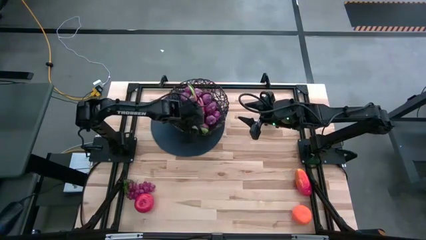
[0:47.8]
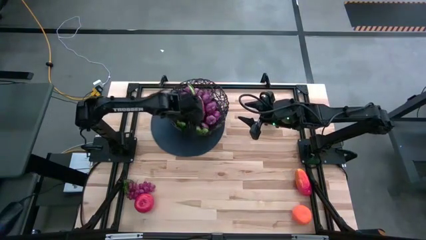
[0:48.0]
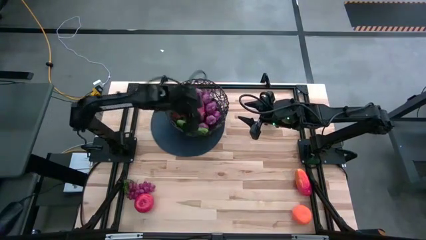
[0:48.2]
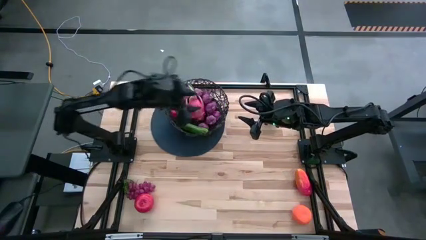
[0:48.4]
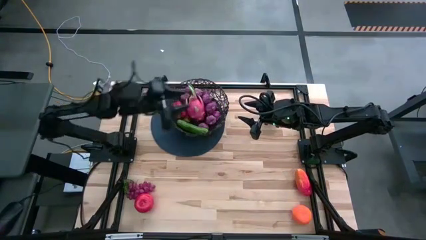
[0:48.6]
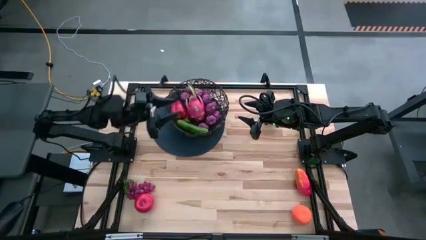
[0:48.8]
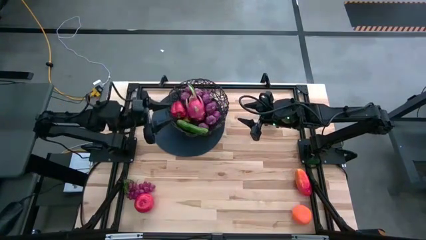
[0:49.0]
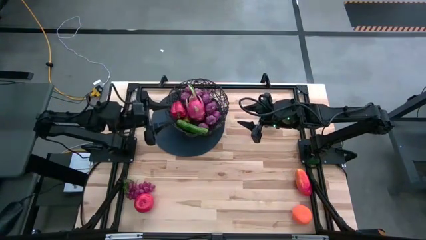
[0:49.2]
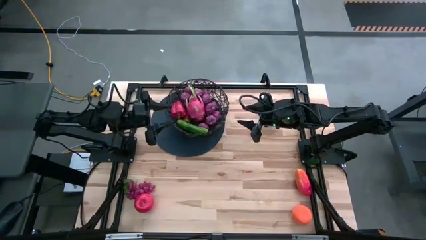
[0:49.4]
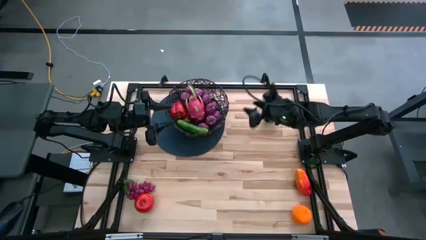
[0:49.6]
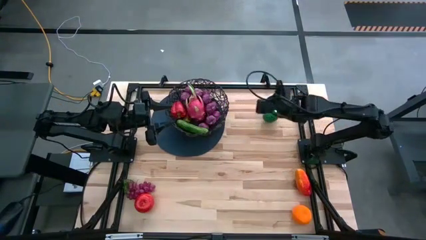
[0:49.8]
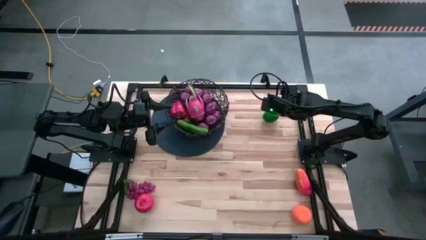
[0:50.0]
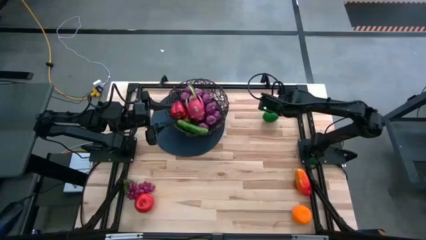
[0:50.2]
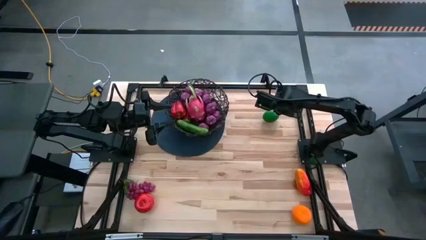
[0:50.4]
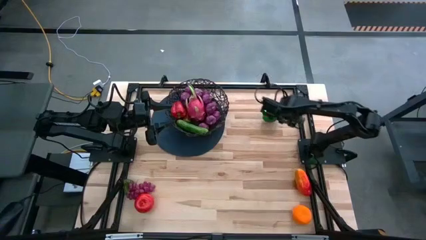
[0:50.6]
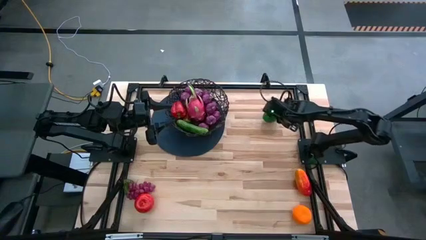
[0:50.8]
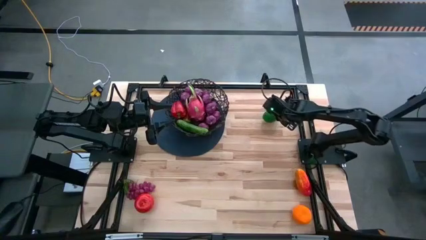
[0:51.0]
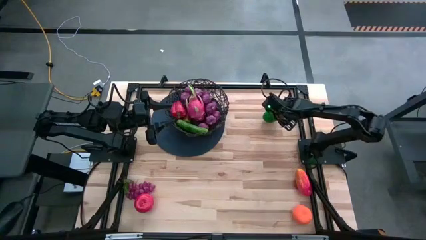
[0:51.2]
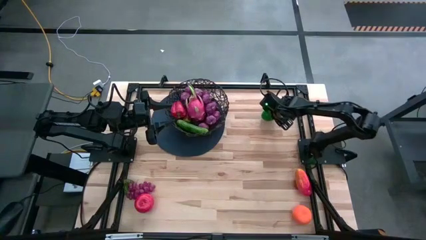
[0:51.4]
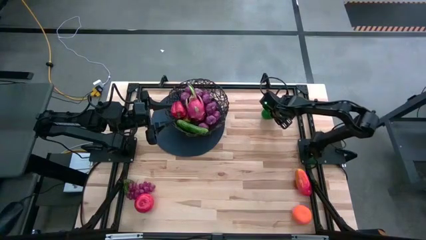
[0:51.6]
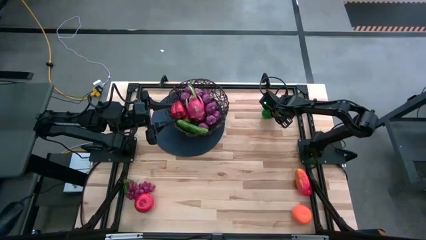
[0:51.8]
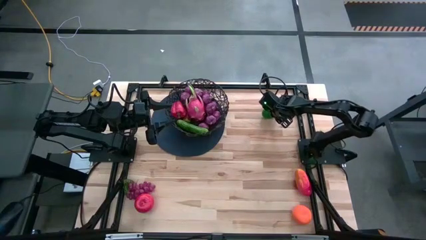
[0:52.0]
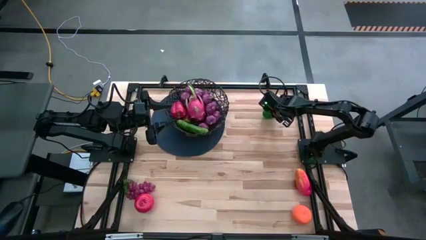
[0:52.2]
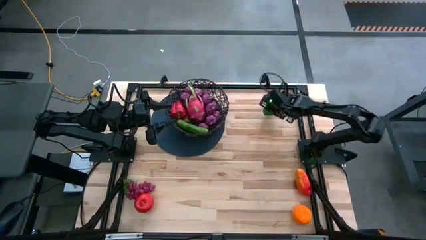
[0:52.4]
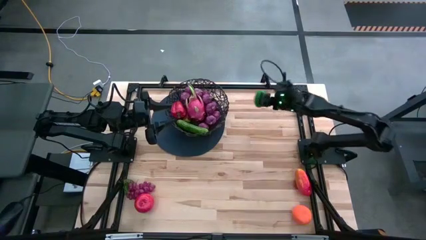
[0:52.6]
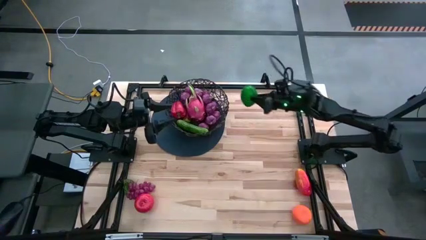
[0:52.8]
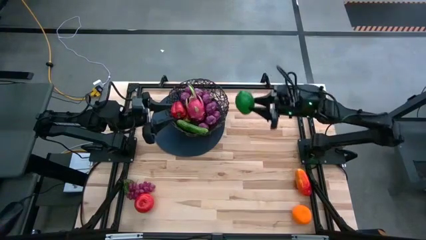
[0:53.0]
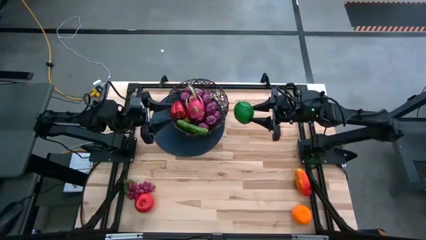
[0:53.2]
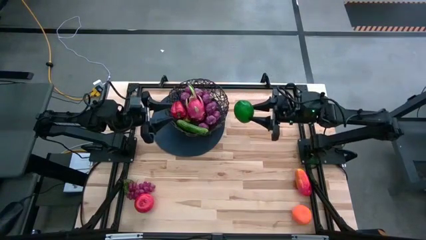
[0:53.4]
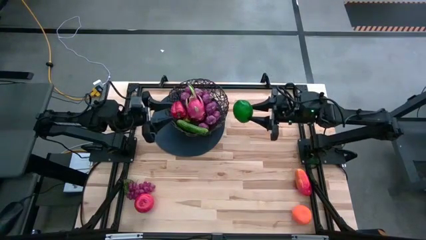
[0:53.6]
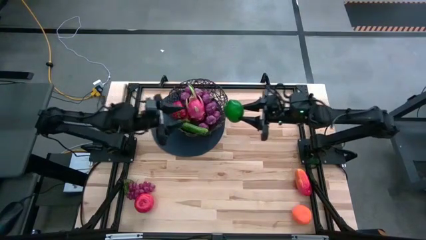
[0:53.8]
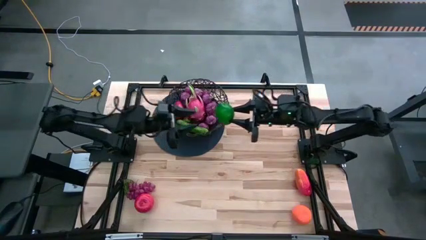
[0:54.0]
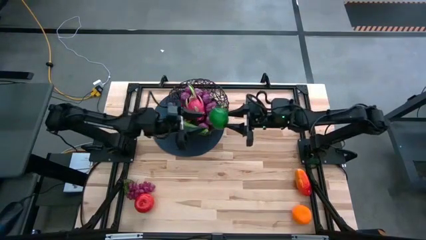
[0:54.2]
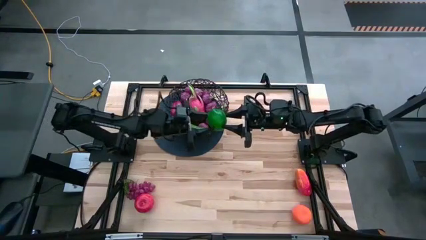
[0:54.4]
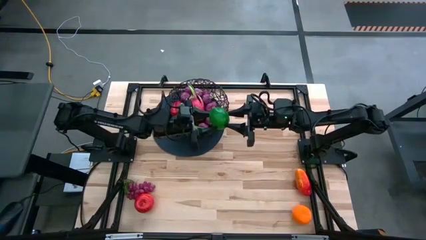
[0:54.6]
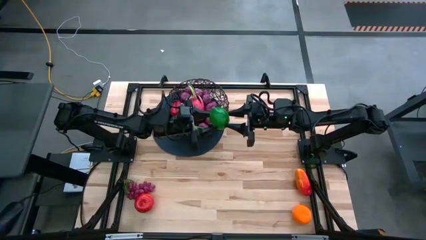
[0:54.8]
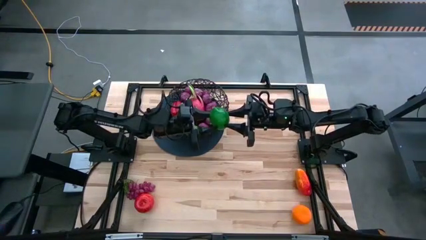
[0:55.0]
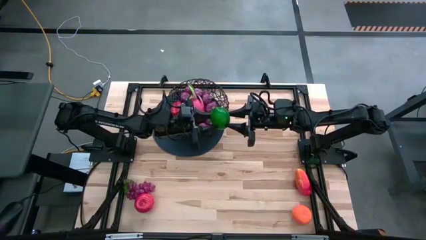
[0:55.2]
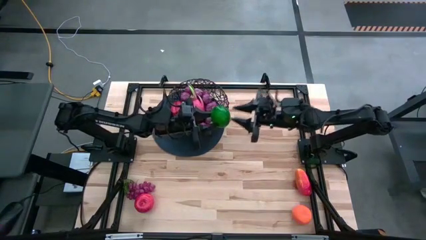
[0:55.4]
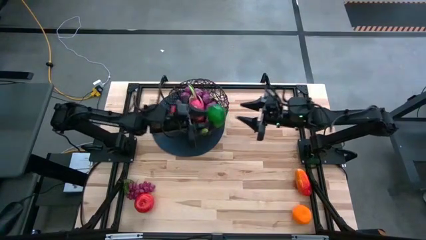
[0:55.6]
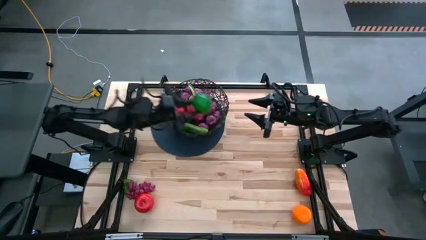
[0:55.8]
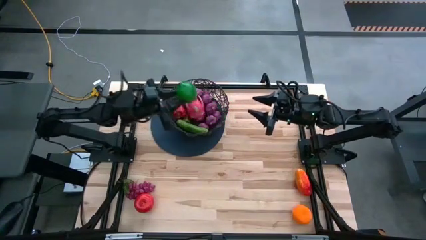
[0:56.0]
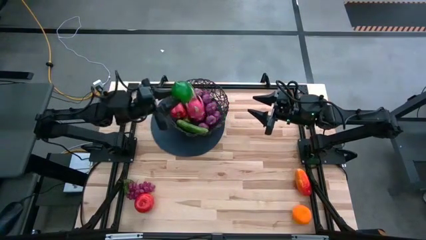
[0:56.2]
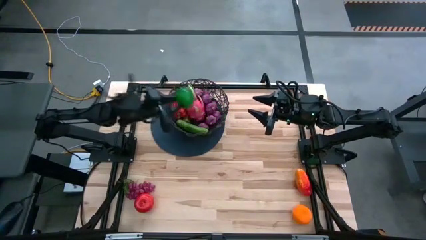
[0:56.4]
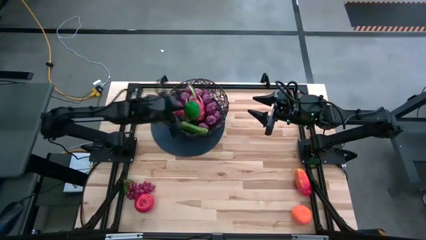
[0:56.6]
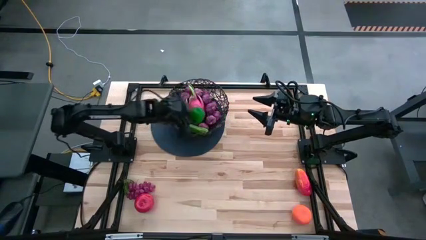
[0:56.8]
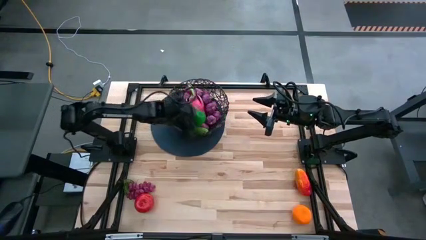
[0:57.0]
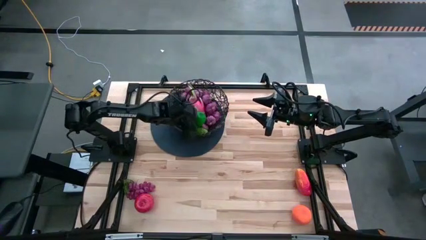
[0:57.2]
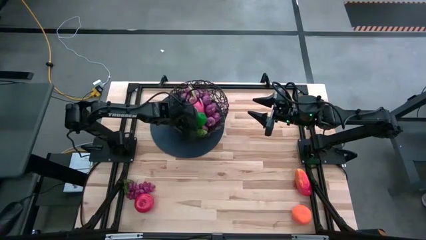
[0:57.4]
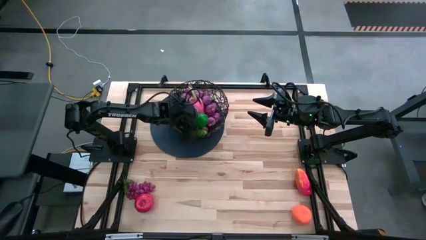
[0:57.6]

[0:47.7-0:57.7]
Task: Build produce basket
Put the green lemon into the black basket

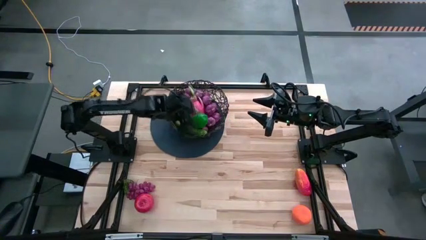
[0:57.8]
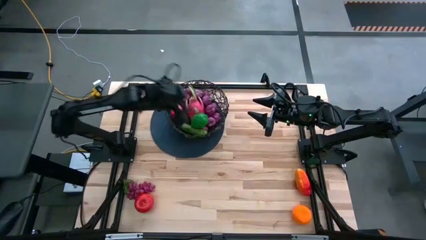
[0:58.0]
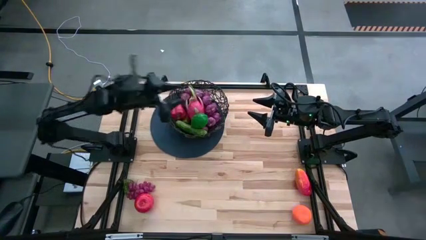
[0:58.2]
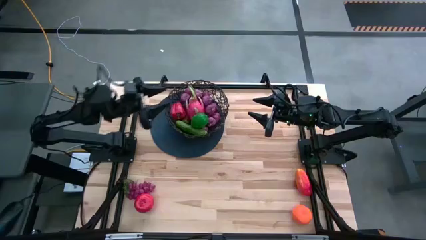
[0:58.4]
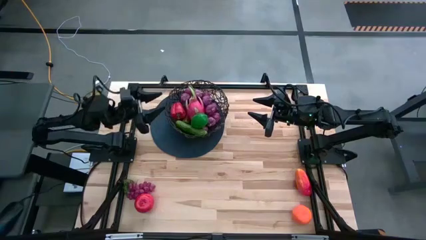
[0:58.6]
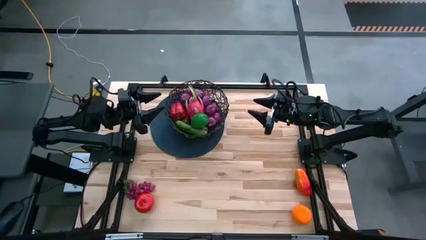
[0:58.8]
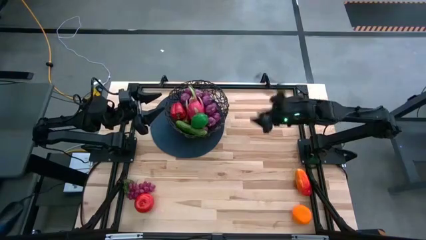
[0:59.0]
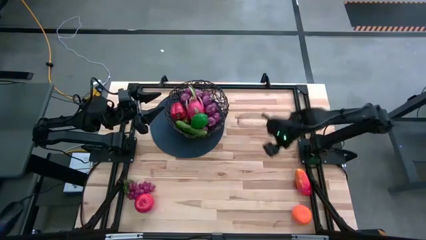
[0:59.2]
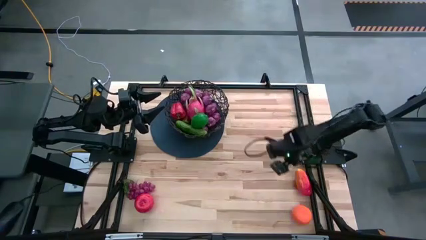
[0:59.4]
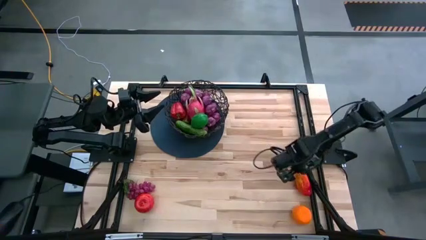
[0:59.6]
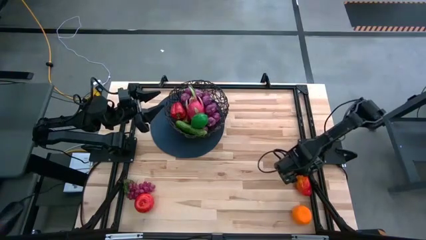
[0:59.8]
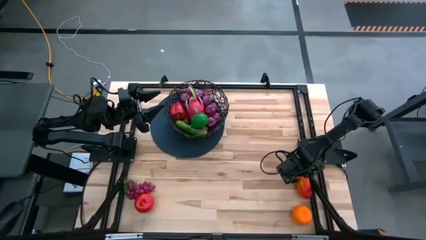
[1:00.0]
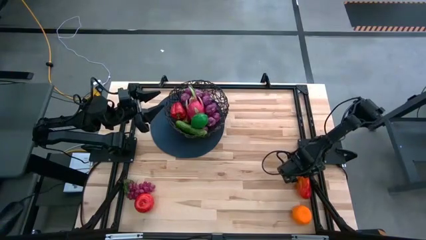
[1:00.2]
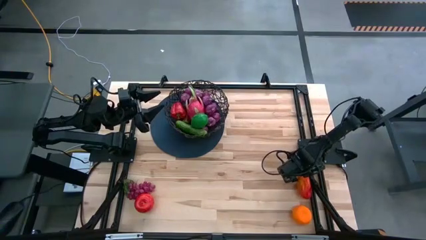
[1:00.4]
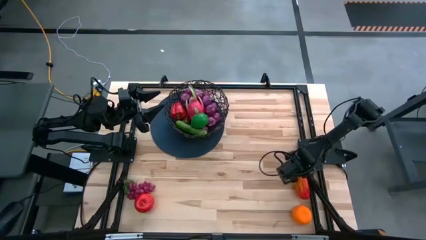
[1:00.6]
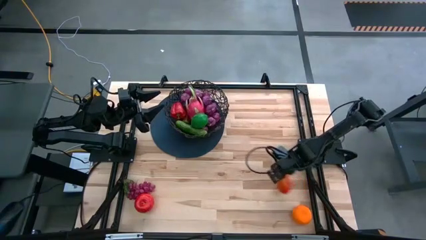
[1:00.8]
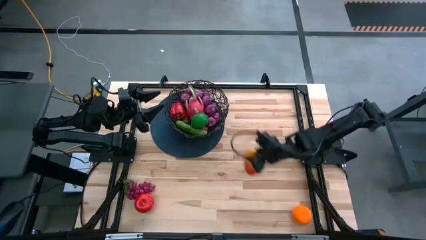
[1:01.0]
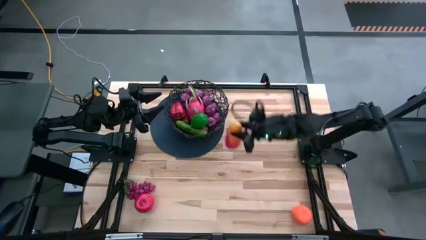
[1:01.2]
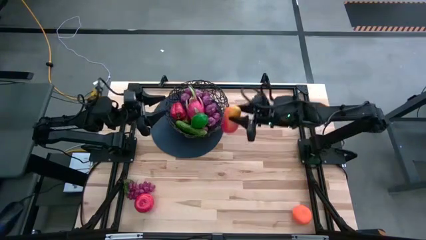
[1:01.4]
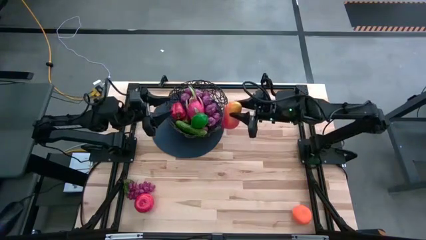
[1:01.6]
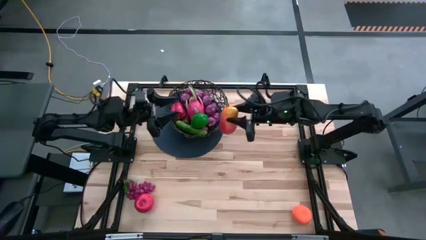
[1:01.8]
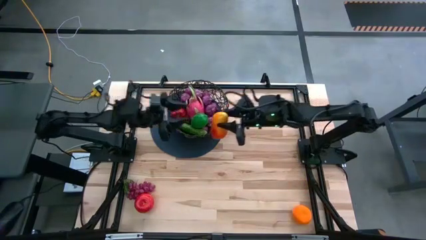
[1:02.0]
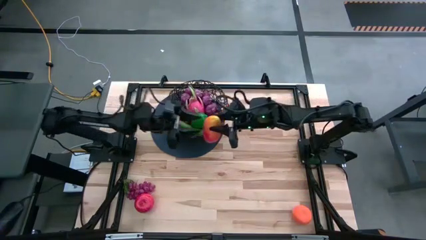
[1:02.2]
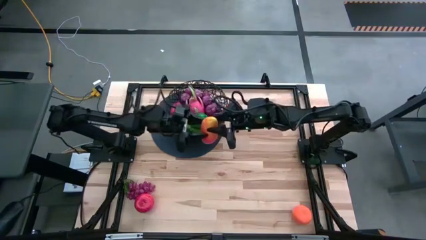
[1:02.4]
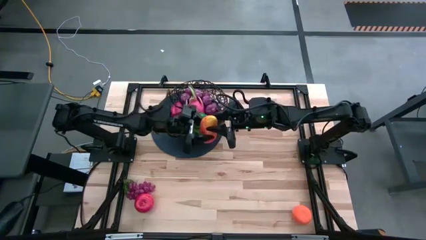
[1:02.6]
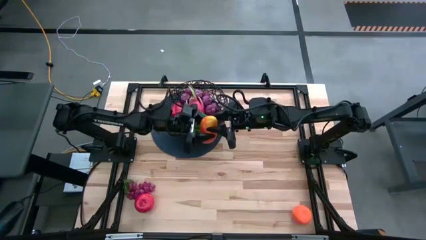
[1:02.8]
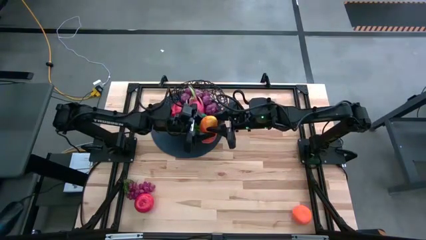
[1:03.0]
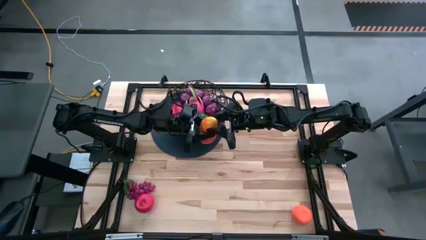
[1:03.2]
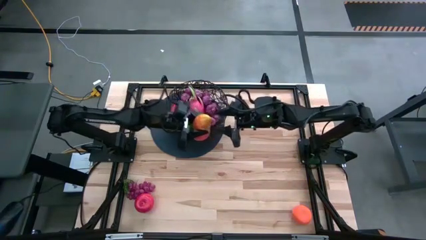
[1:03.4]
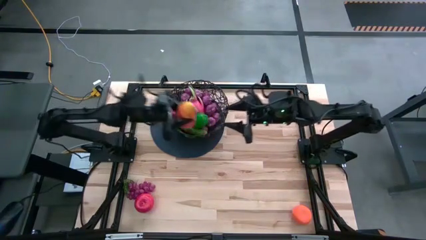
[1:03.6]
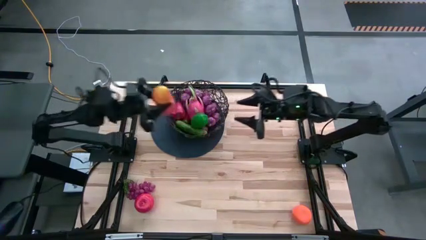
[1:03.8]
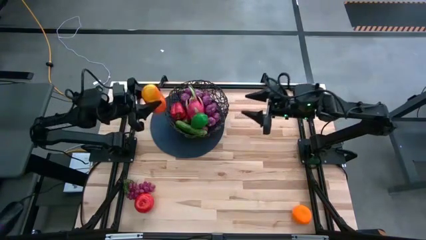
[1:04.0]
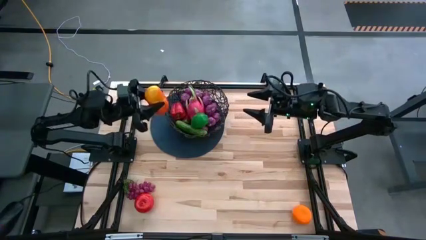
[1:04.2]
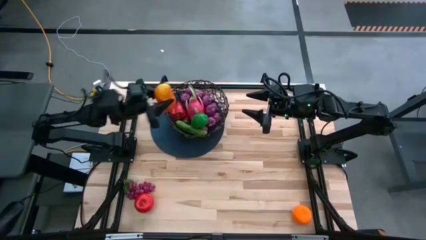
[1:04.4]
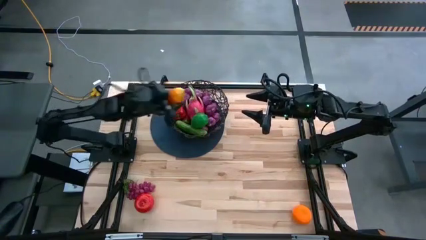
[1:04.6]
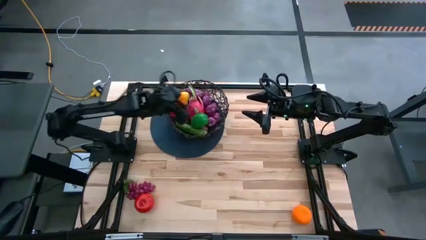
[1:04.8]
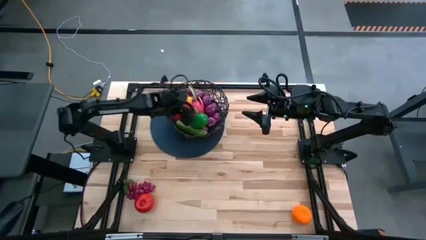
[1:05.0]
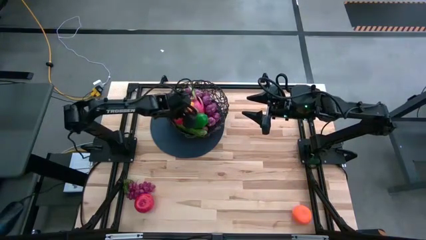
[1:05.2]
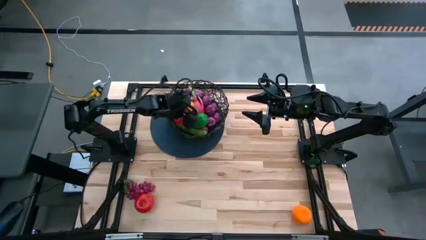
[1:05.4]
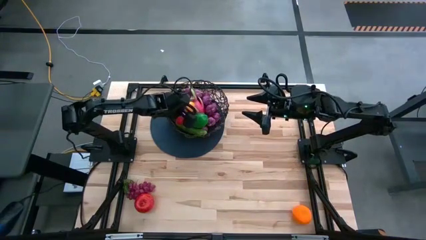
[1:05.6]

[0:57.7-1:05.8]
Put the mango into the black basket
